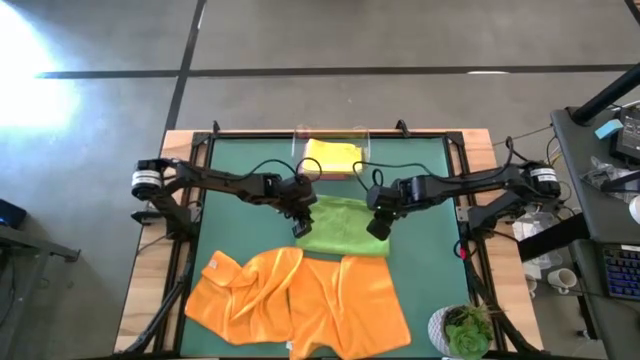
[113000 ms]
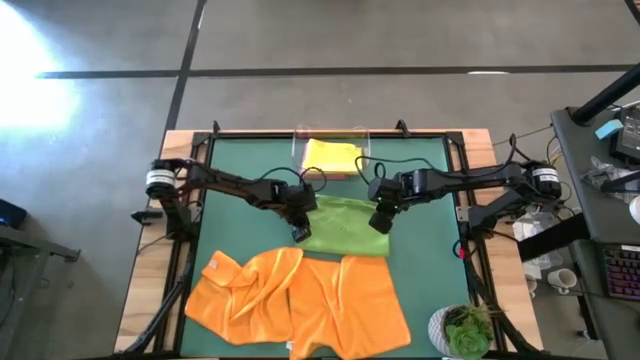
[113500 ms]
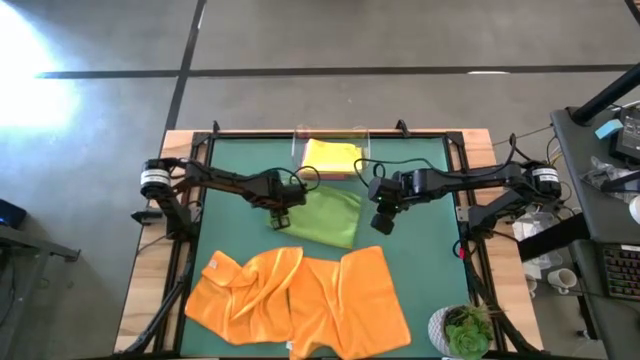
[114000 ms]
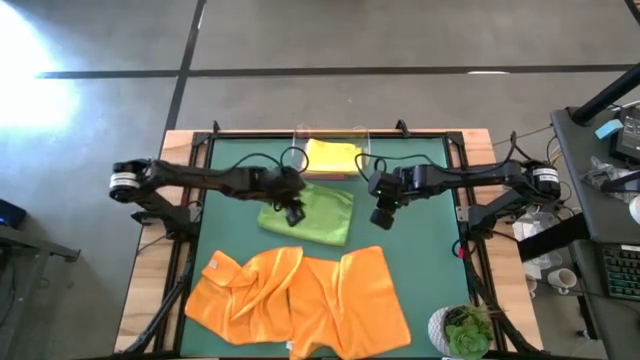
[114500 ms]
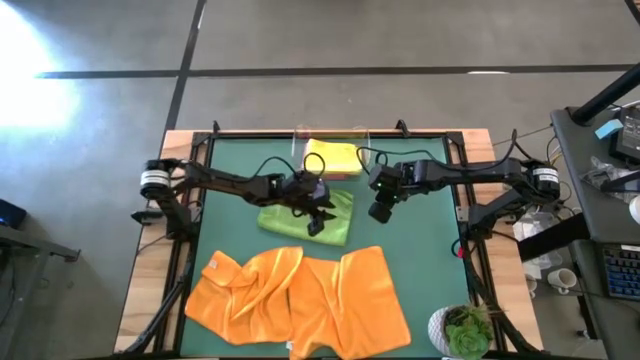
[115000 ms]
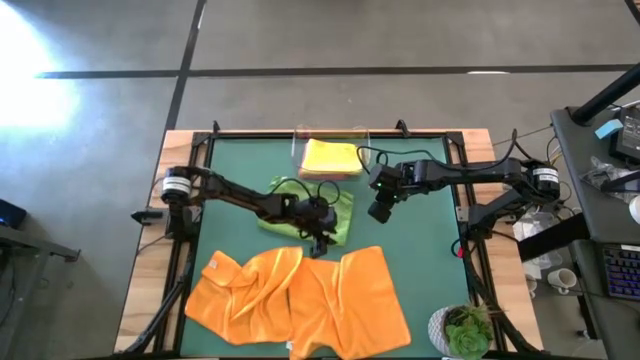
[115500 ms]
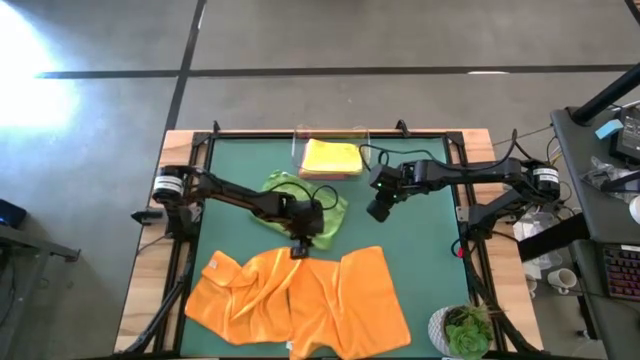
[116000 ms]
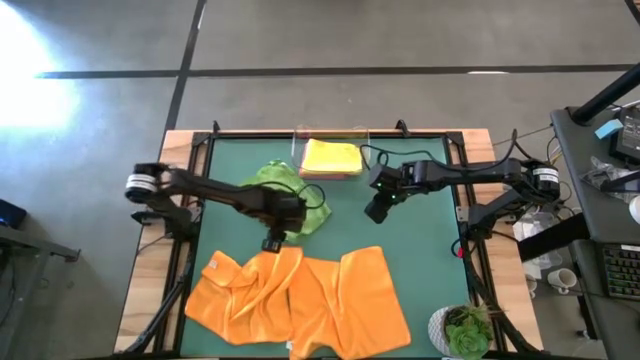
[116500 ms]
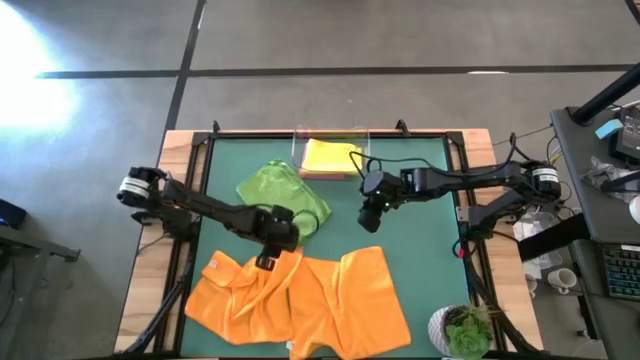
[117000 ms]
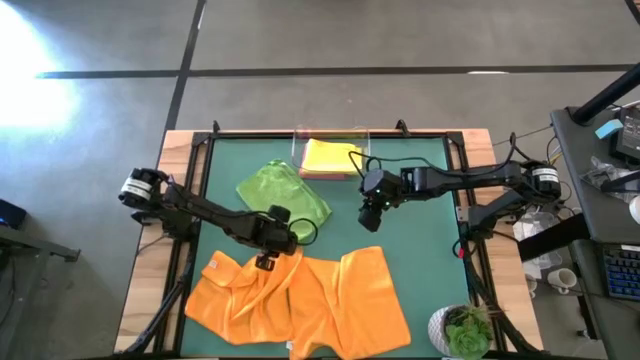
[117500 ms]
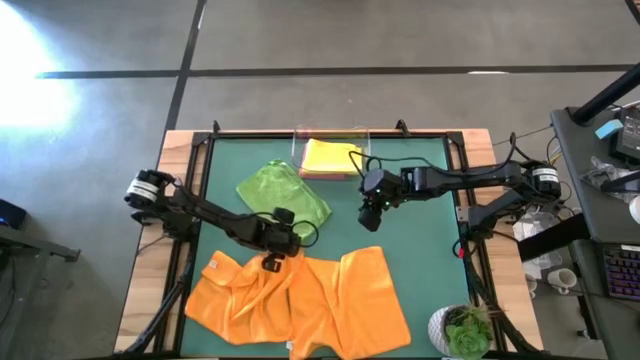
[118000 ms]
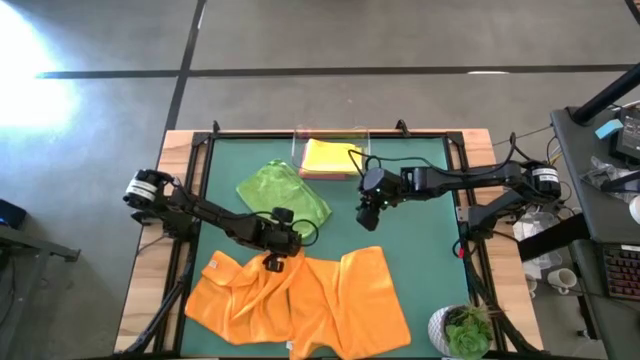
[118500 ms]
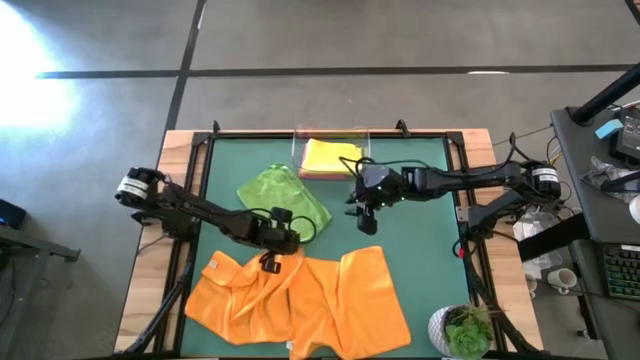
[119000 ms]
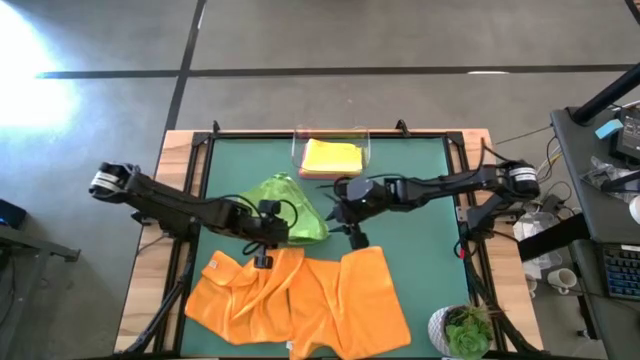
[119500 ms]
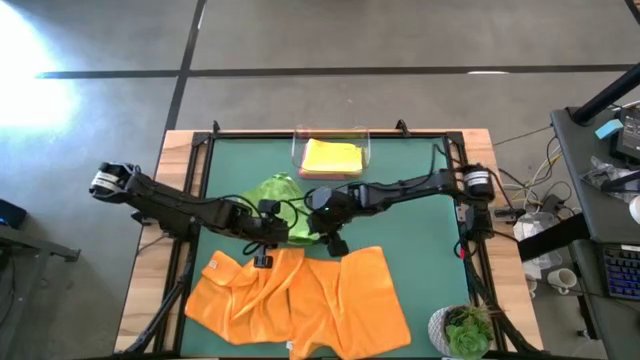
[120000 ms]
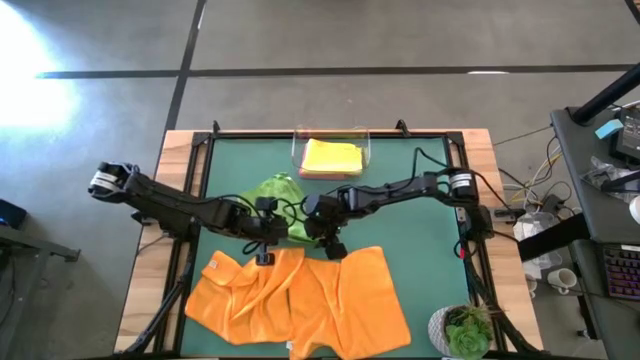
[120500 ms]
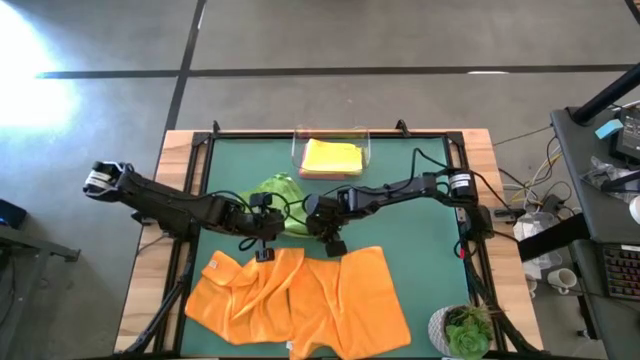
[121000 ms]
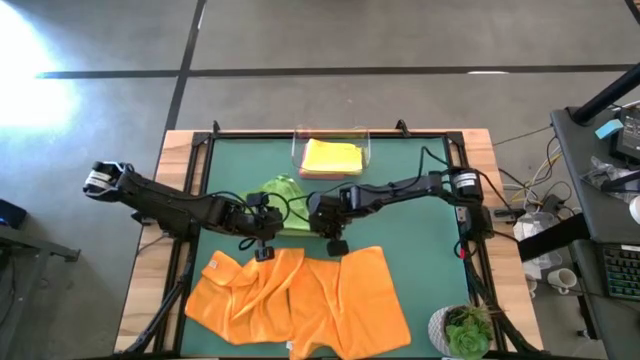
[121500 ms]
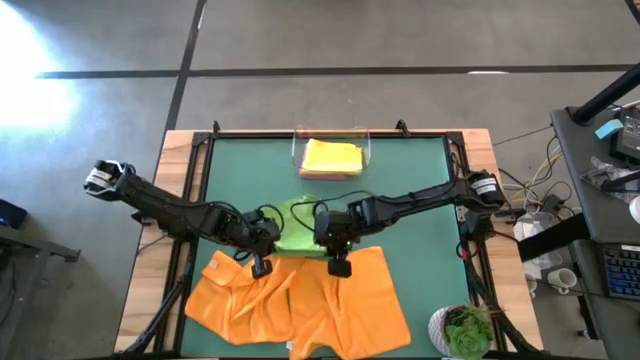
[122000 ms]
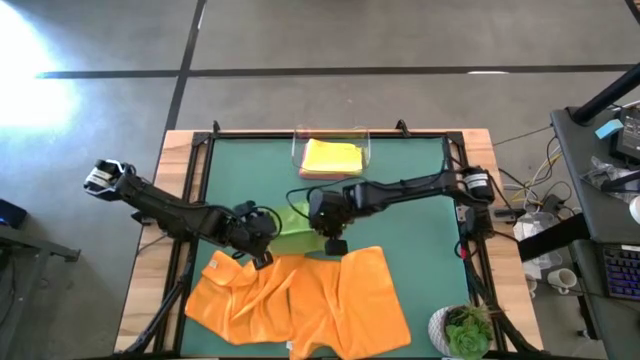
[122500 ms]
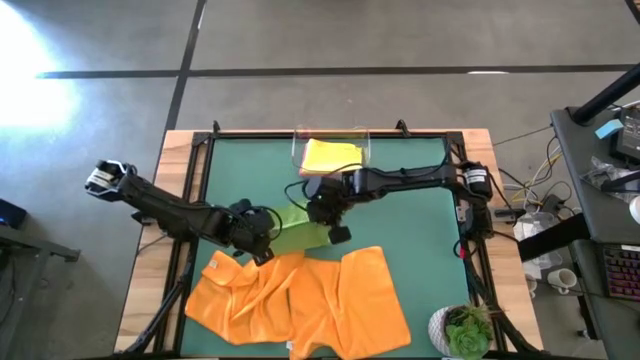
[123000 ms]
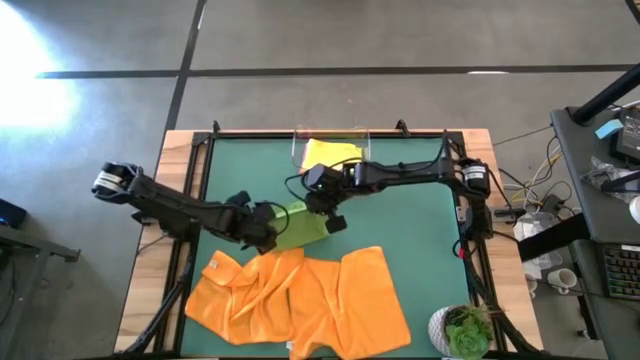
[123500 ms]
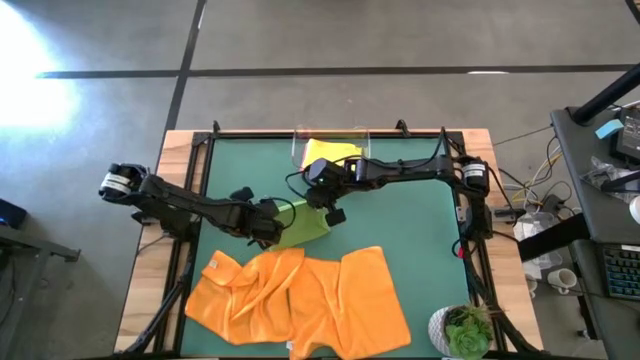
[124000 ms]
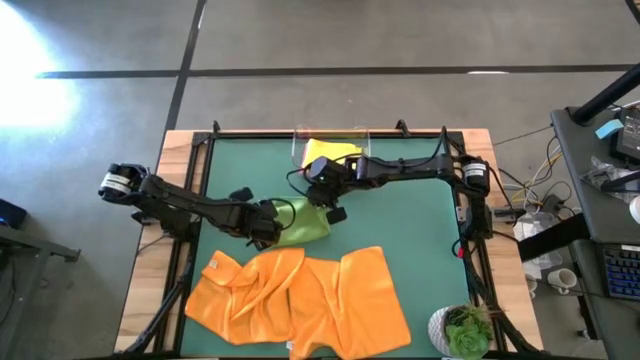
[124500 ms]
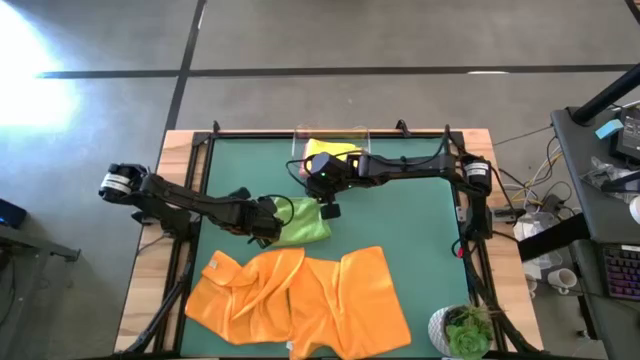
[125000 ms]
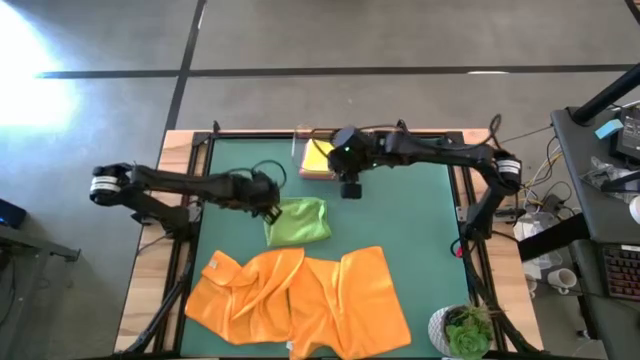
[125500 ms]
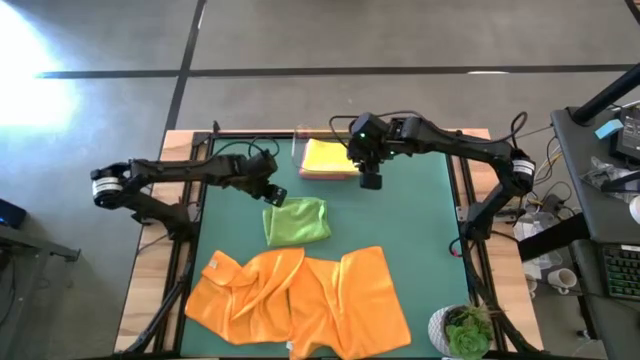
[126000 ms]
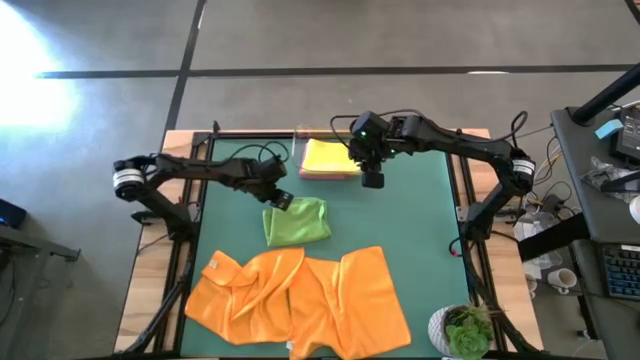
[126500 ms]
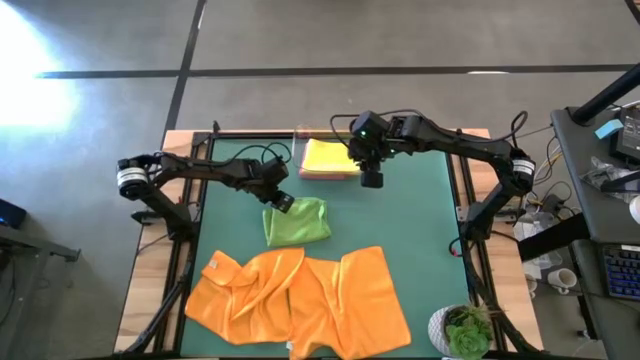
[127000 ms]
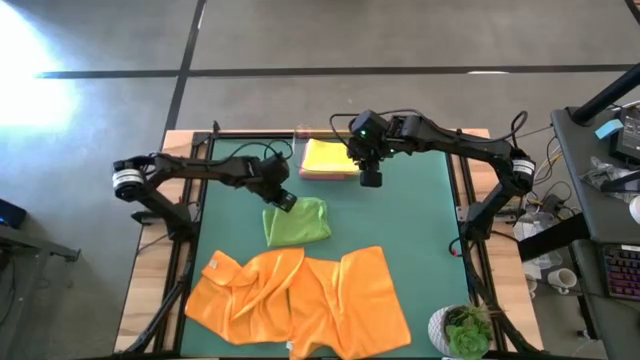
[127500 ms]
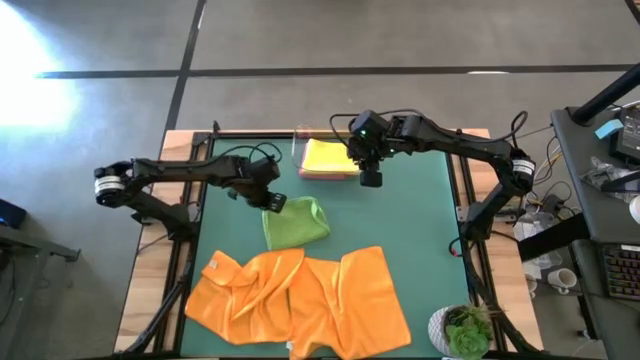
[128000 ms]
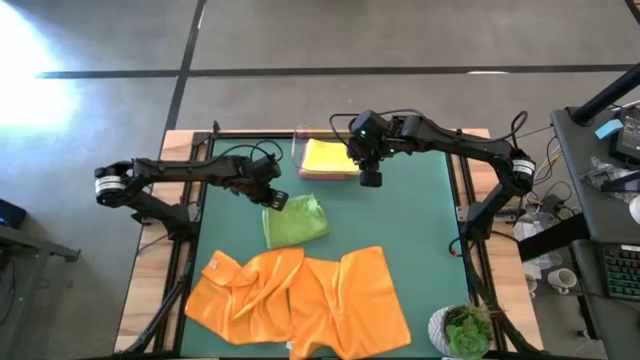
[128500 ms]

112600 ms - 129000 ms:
Task: Fold microfiber towels
Fold the green microfiber towel

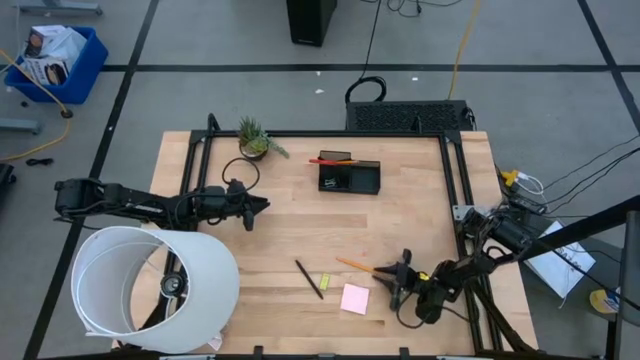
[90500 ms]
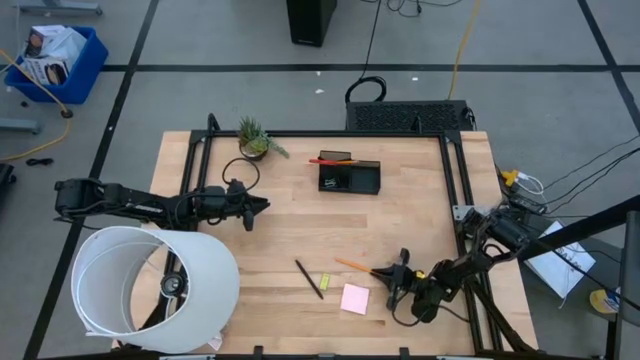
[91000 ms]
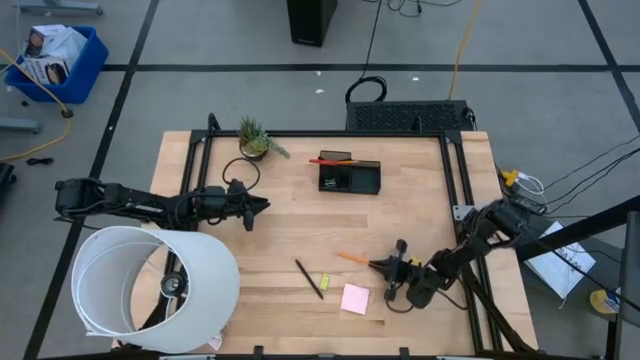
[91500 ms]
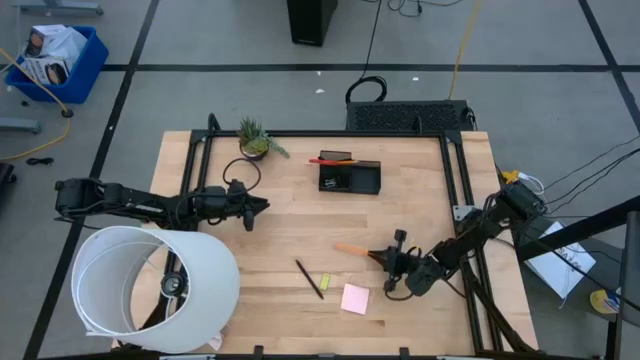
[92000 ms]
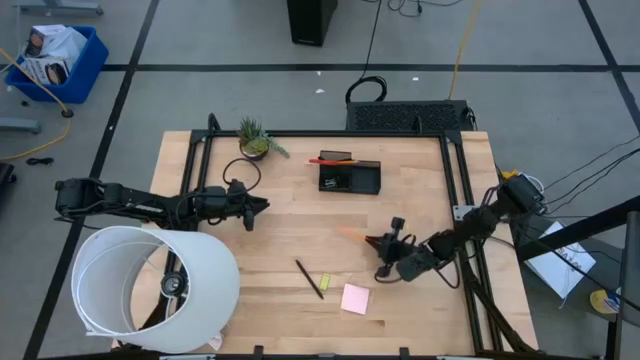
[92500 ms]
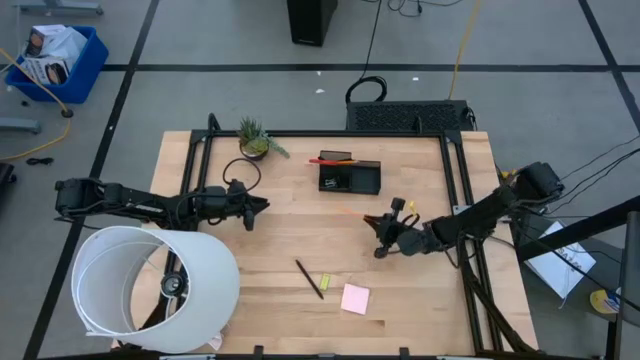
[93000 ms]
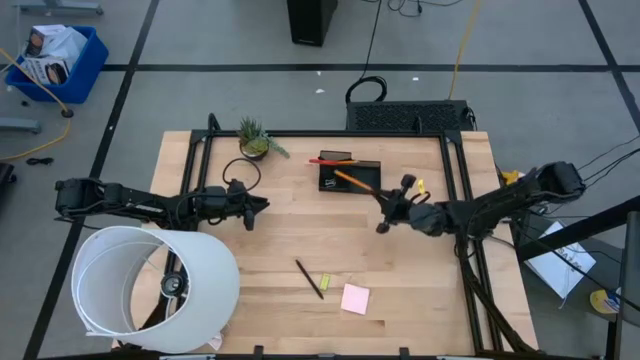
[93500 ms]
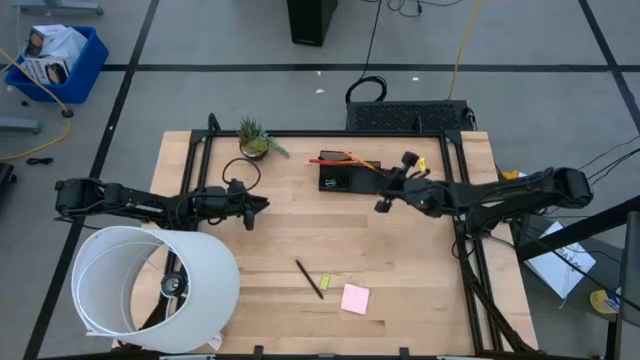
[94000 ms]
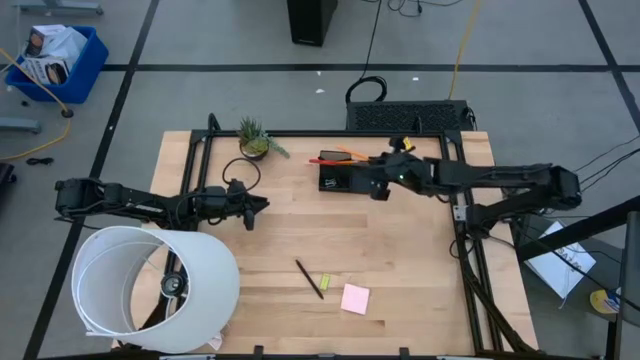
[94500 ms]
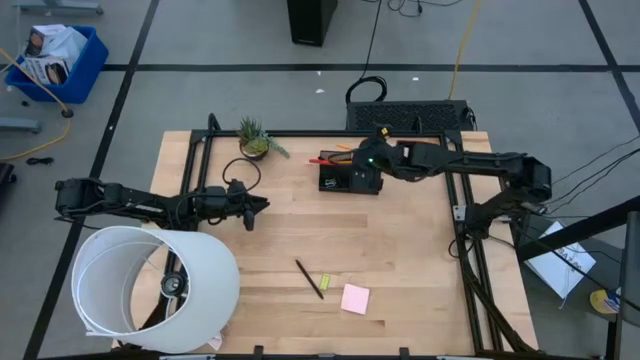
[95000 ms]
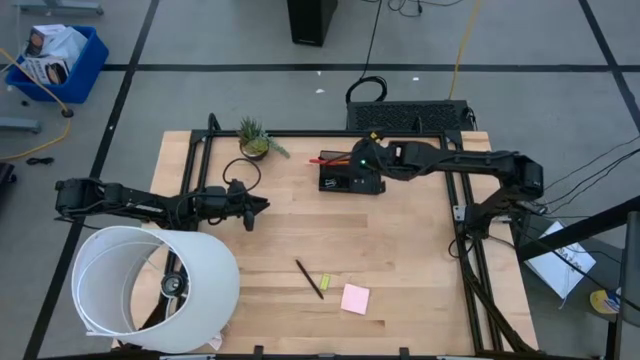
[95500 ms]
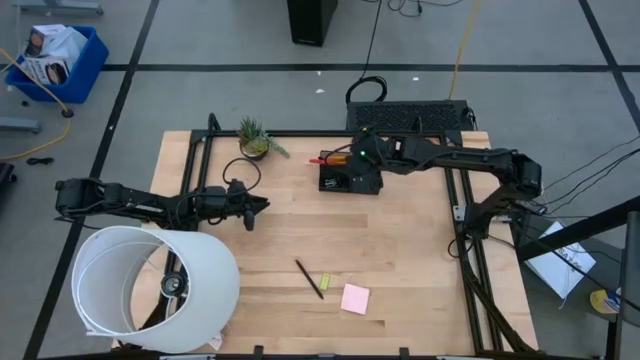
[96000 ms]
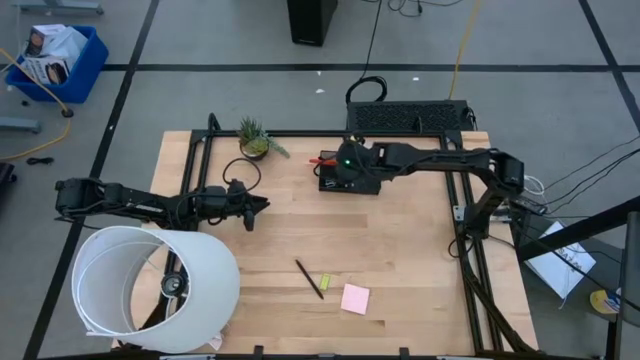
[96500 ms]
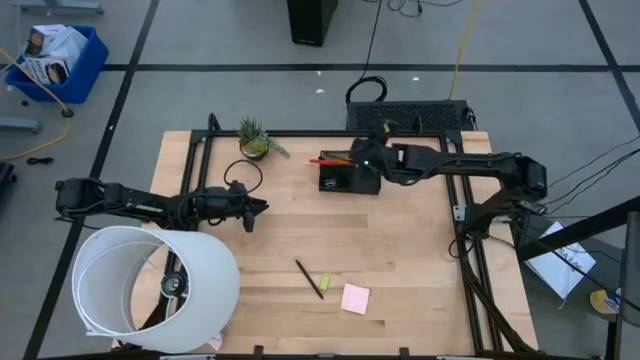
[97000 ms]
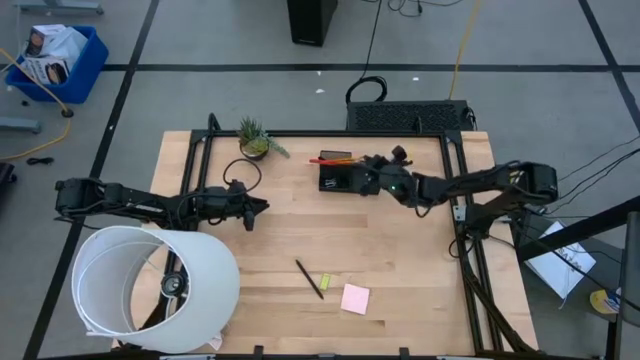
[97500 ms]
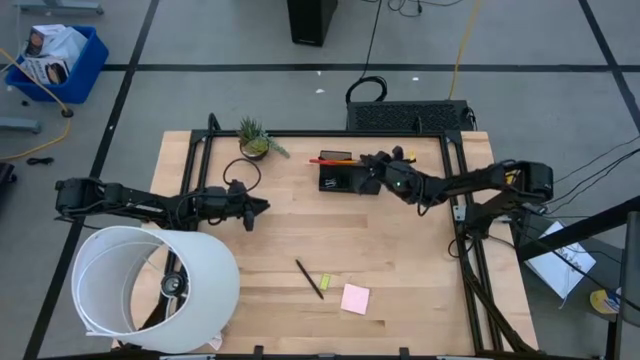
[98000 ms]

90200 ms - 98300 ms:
Task: Pick and place office supplies into organizer
Put the orange pencil into the desk organizer
